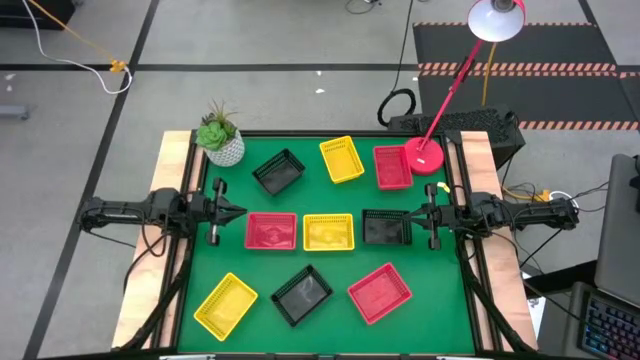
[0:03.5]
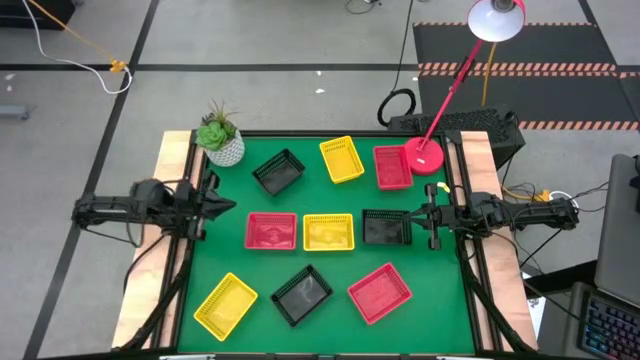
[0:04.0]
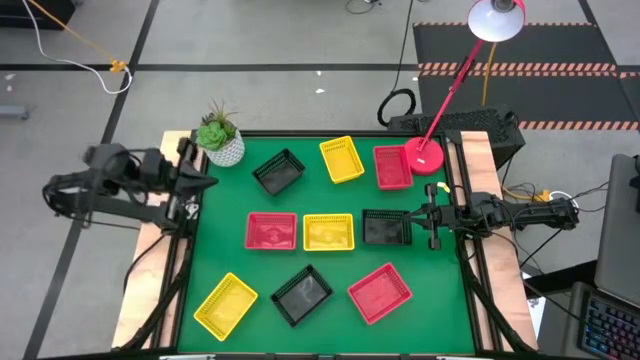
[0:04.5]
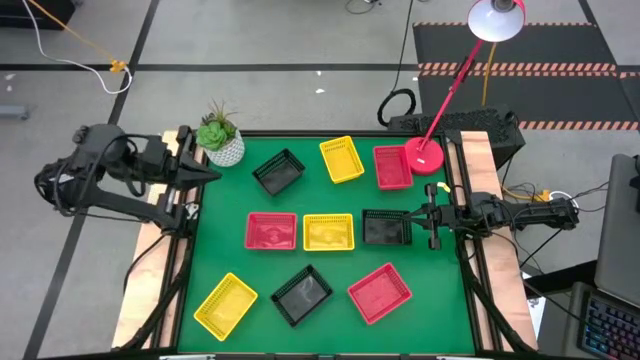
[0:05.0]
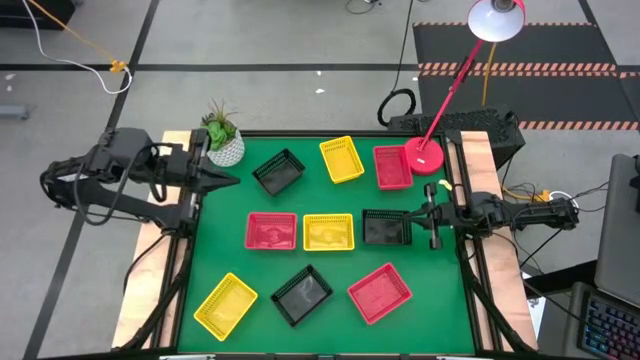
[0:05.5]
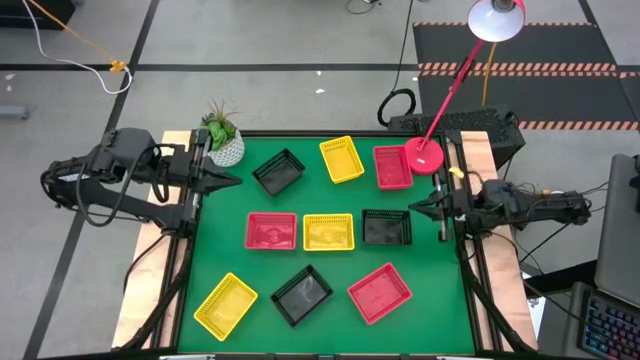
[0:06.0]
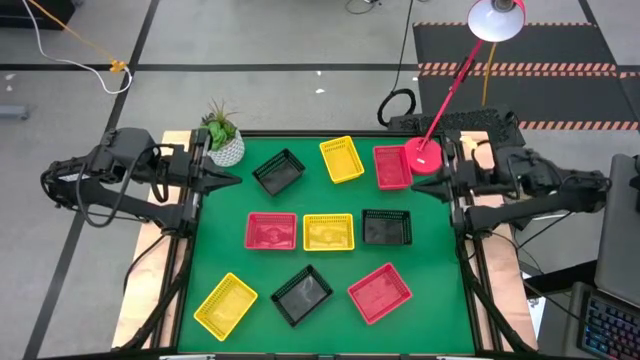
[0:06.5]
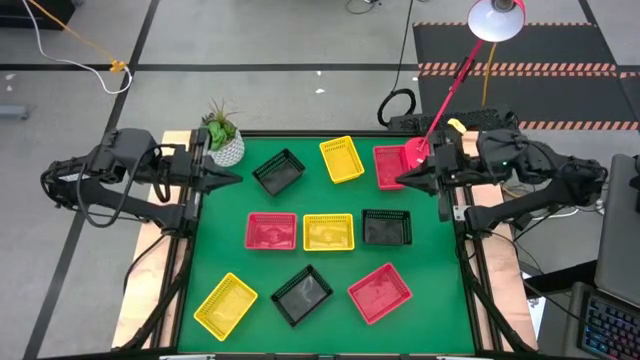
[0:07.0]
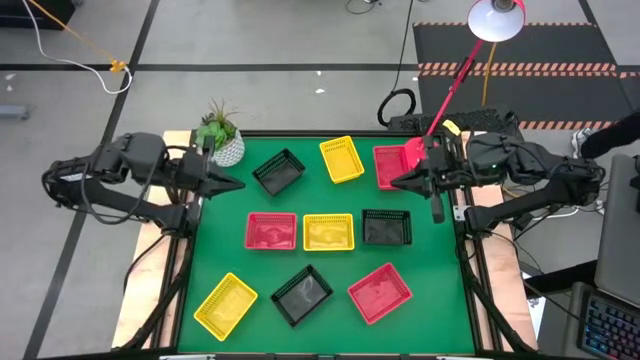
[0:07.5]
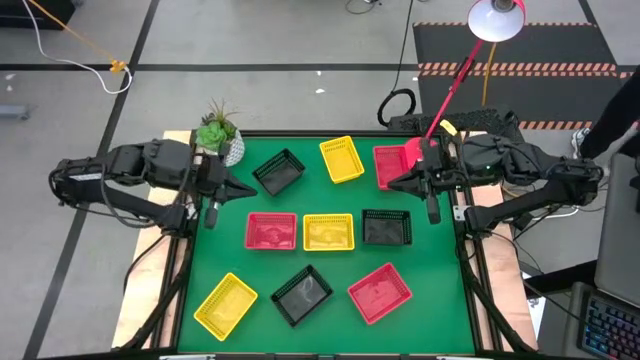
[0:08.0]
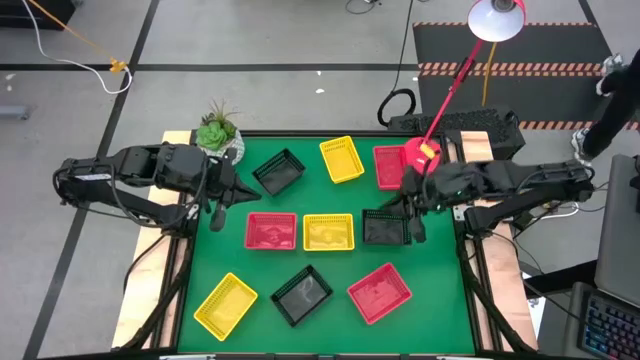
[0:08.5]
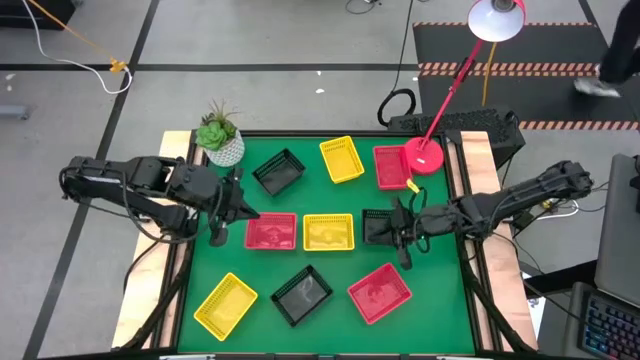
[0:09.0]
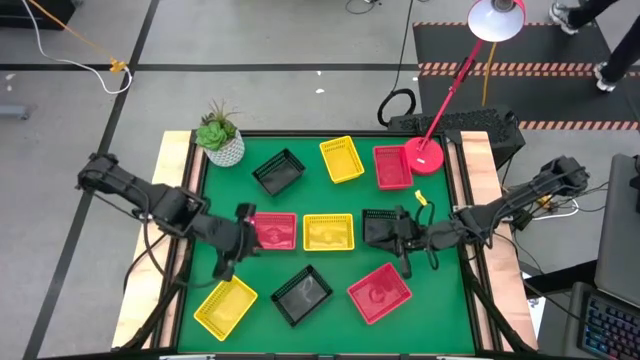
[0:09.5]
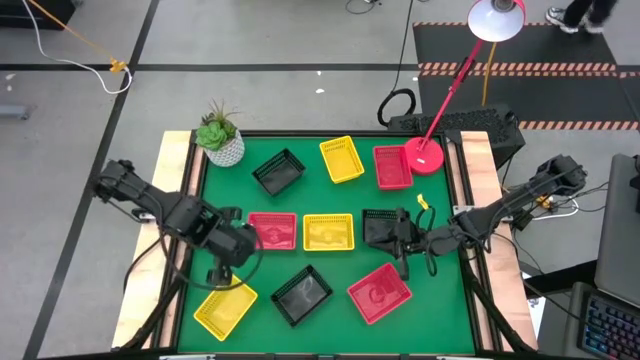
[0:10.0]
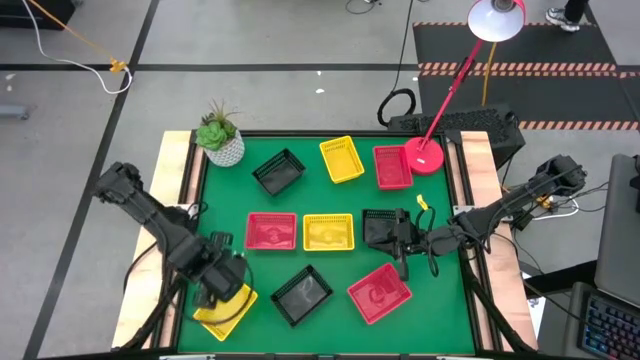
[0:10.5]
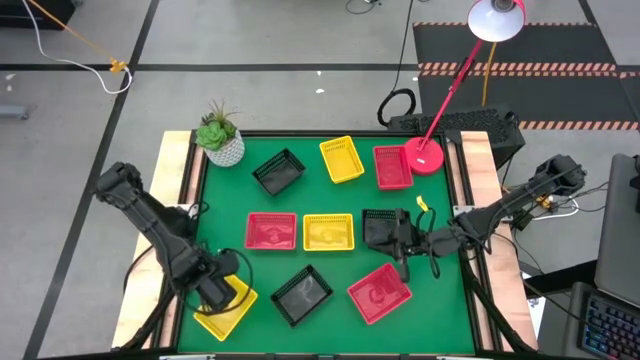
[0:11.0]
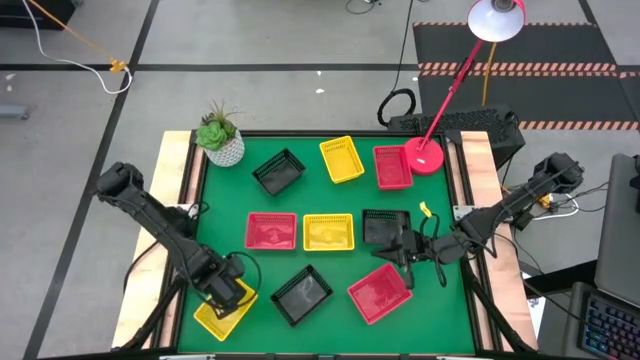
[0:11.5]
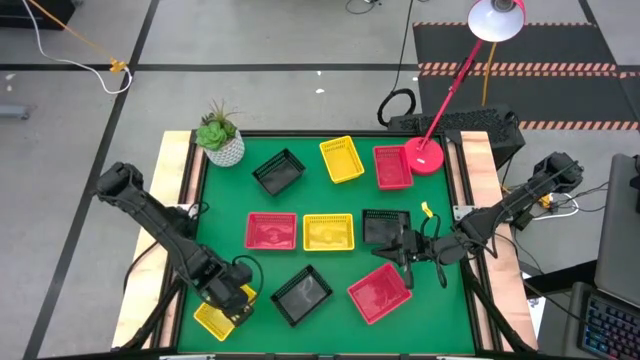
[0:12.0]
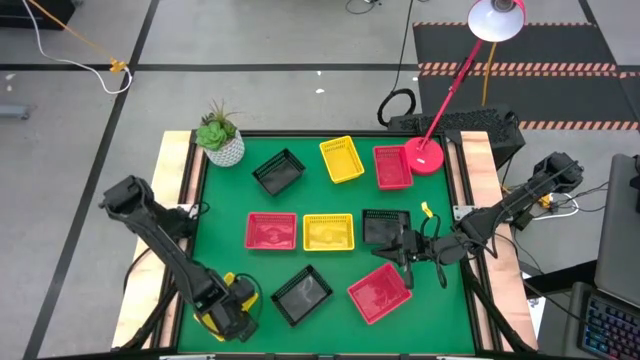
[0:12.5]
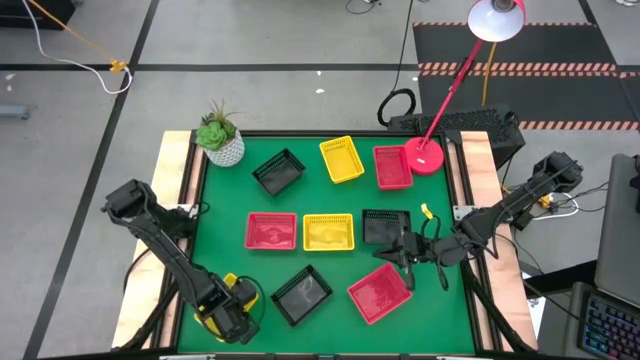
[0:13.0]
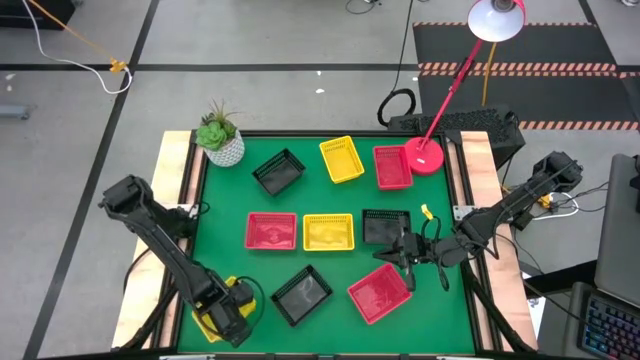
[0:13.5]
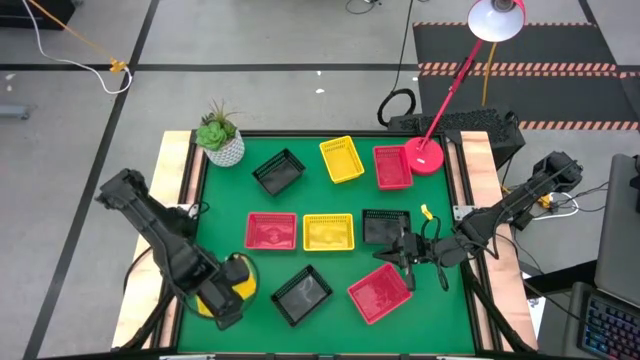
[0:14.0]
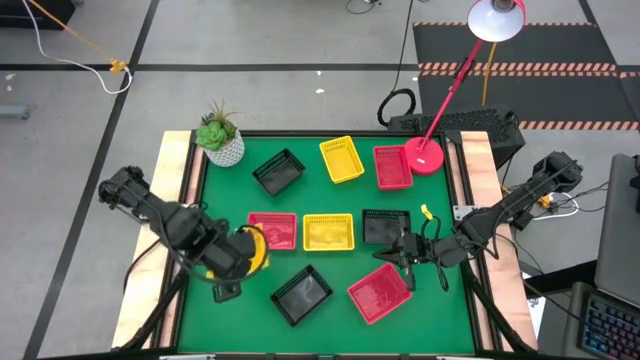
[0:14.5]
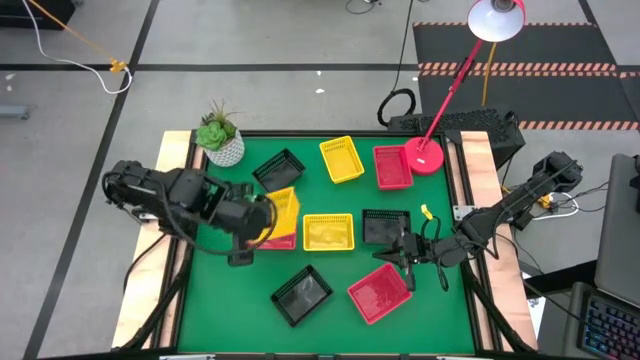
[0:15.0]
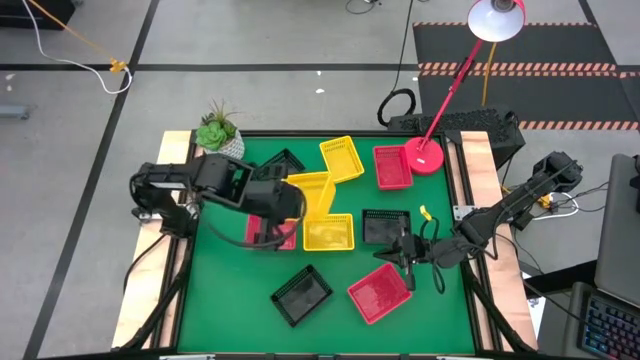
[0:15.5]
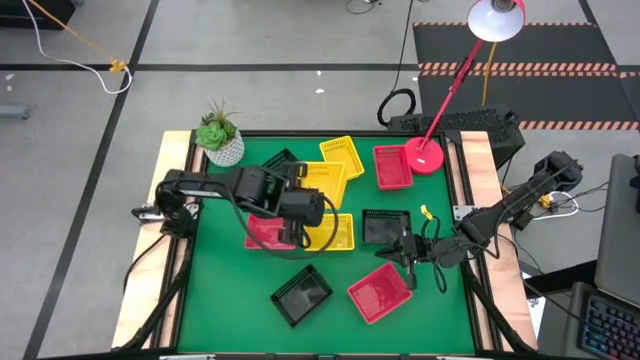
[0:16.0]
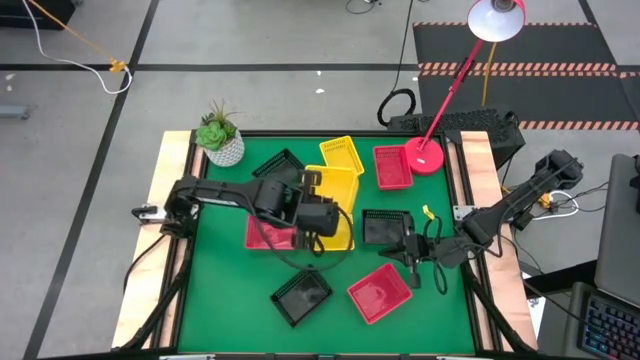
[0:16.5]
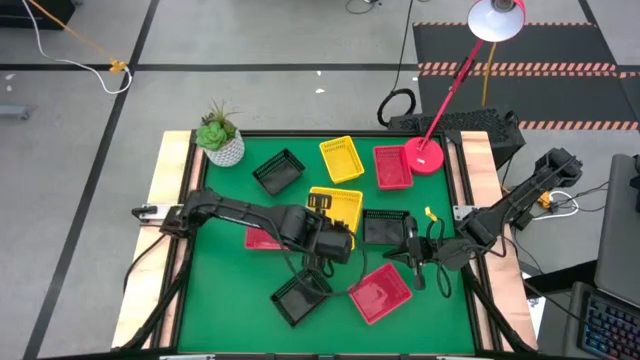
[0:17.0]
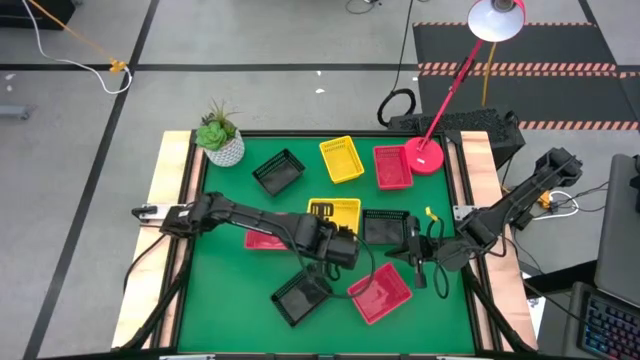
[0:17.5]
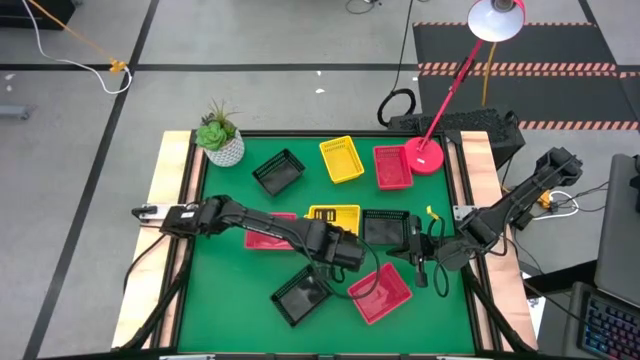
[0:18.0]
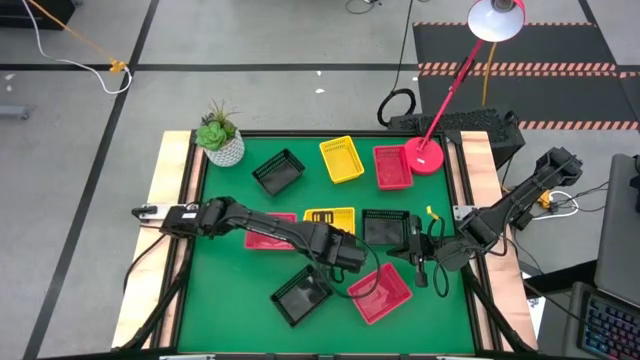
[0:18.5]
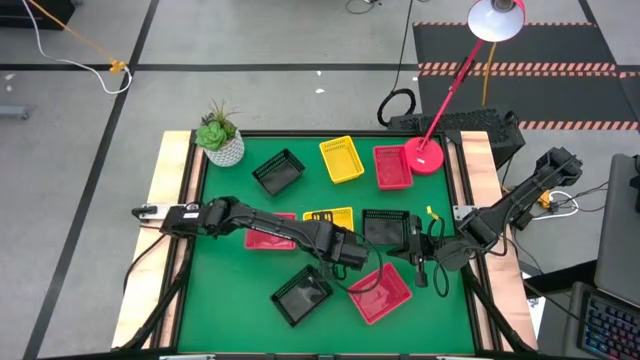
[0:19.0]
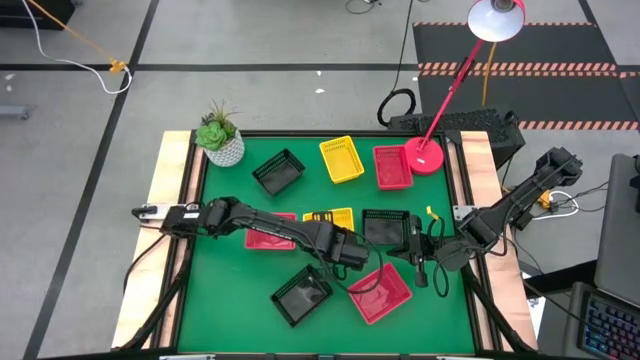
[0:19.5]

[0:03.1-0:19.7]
Stack the left yellow bin on top of the yellow bin

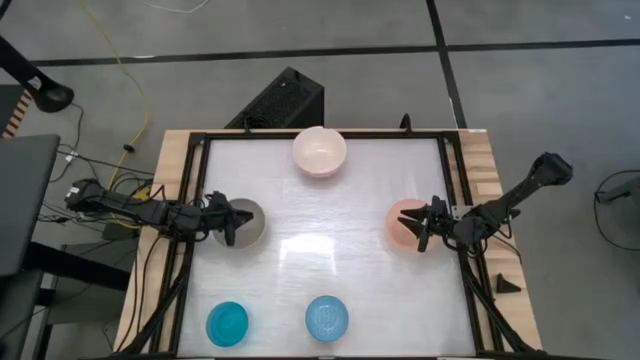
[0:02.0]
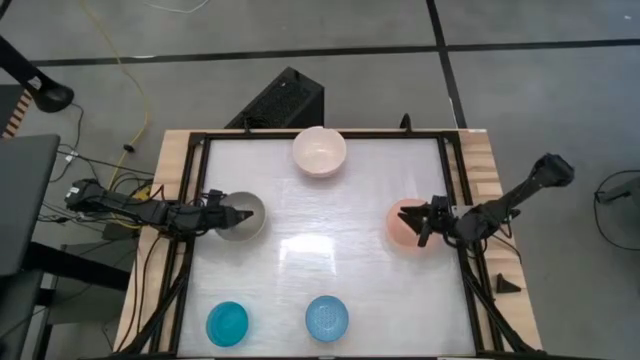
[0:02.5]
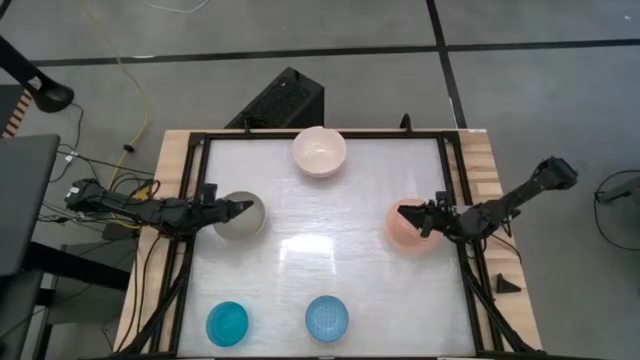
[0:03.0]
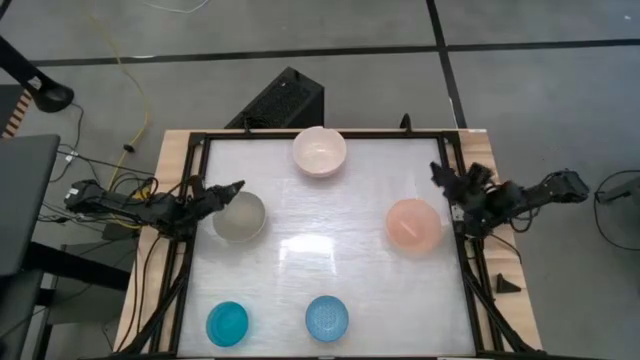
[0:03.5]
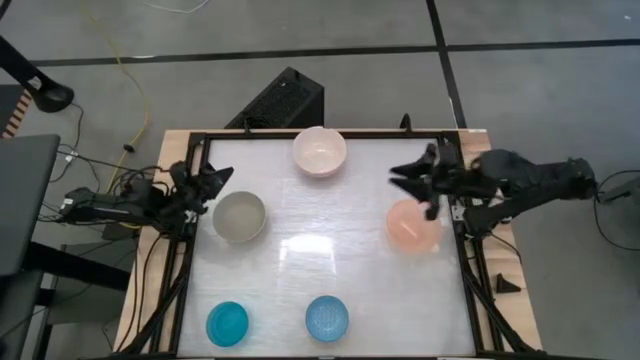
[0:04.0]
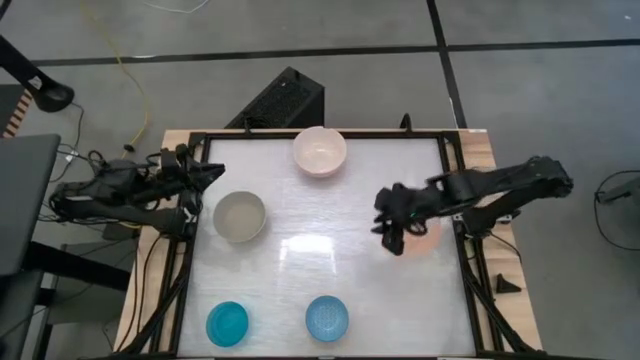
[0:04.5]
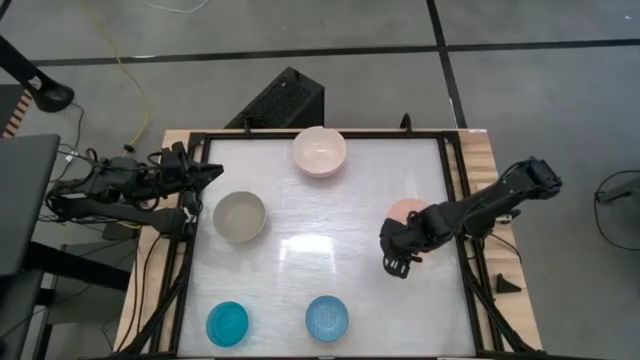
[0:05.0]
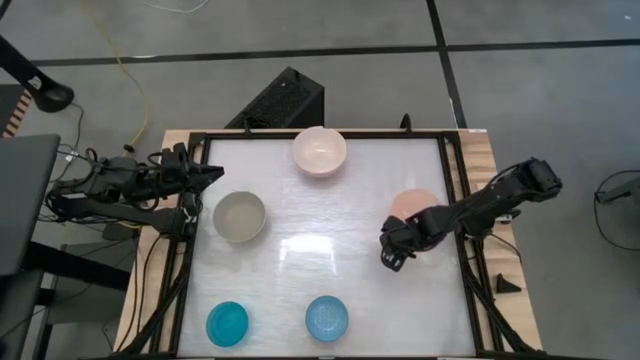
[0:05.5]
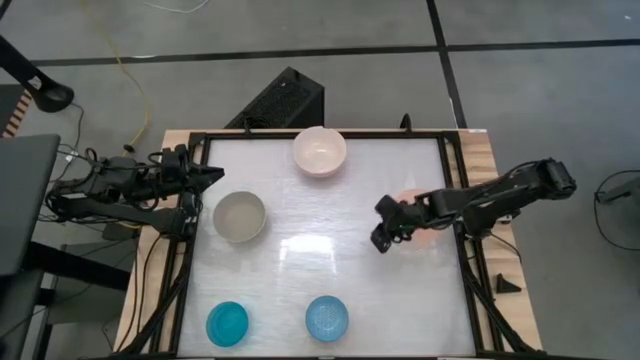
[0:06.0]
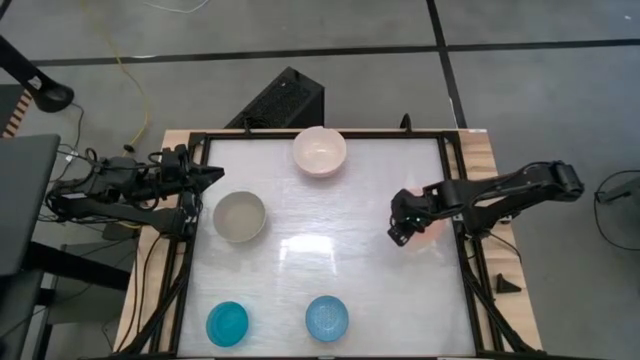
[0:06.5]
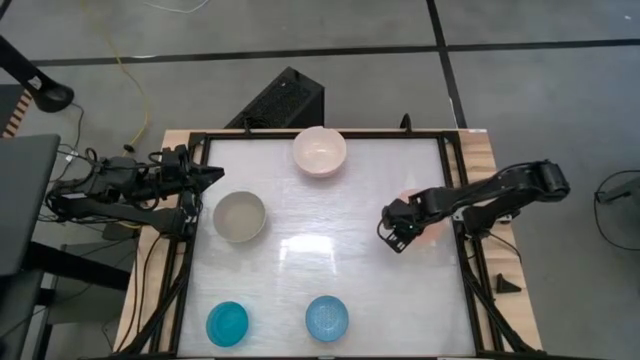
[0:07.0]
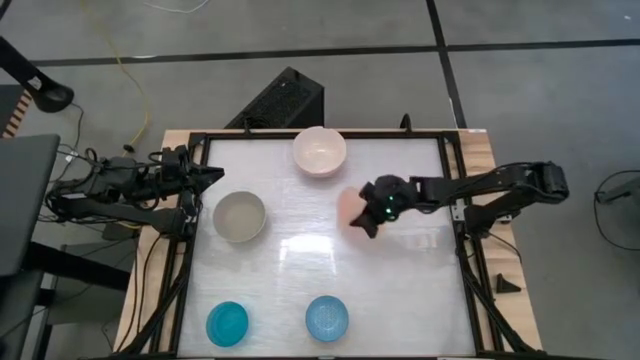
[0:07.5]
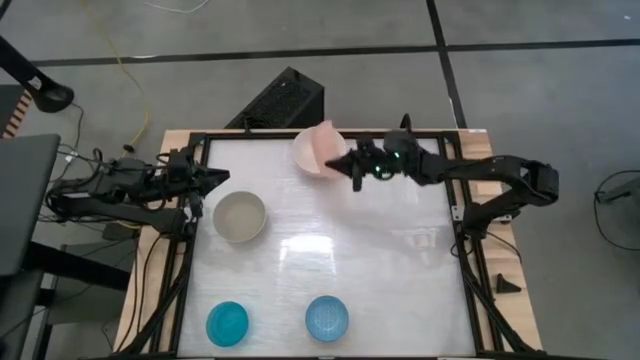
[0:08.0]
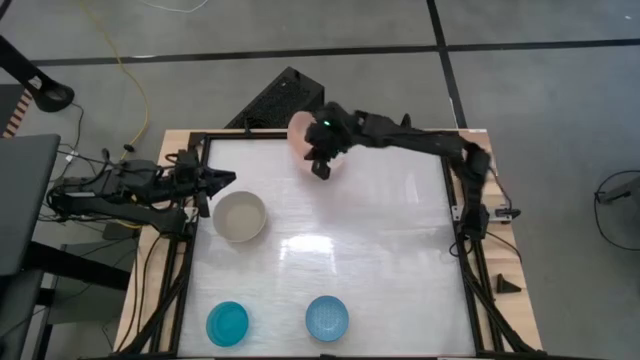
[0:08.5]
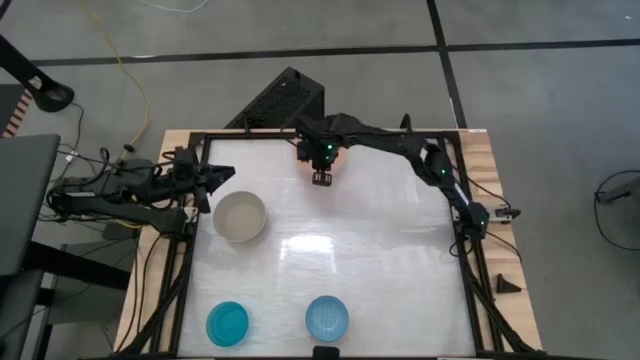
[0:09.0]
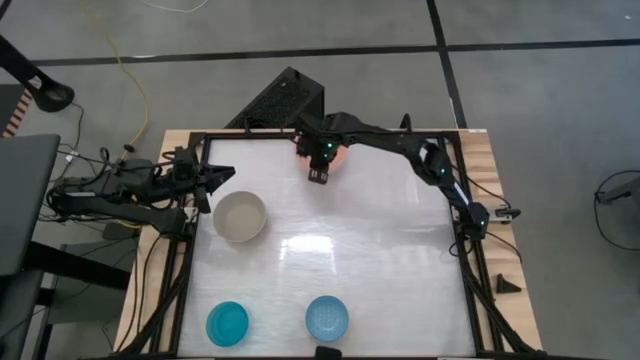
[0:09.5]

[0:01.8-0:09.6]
Stack the orange bowl on top of the white bowl
